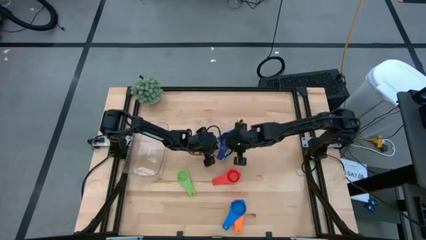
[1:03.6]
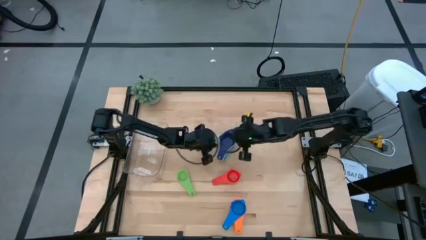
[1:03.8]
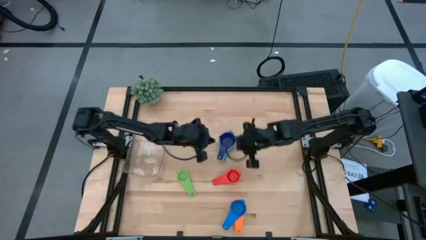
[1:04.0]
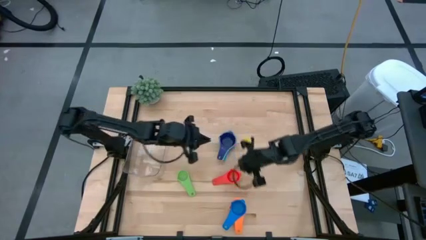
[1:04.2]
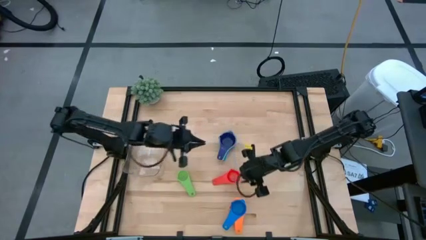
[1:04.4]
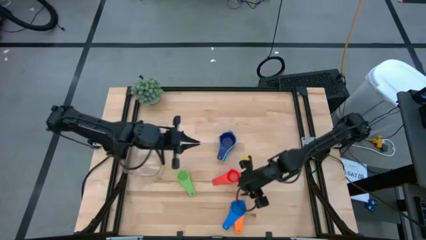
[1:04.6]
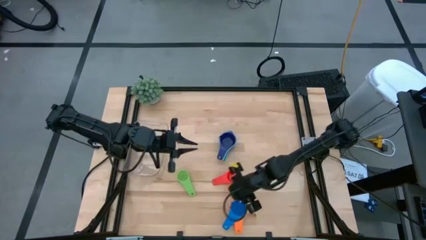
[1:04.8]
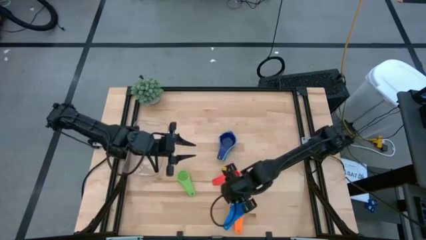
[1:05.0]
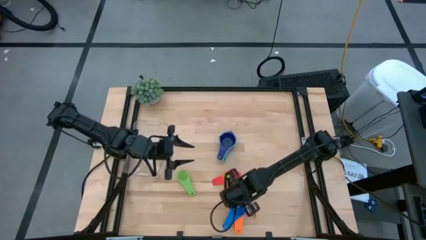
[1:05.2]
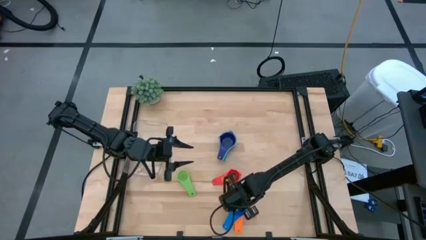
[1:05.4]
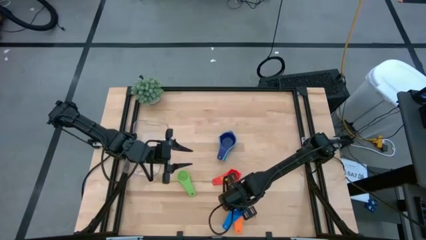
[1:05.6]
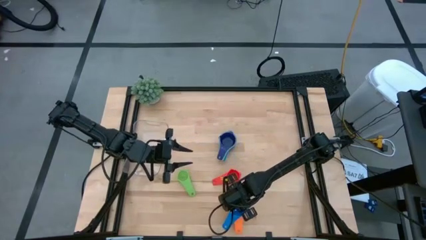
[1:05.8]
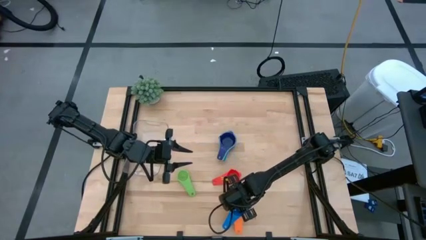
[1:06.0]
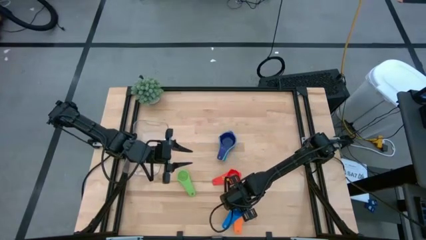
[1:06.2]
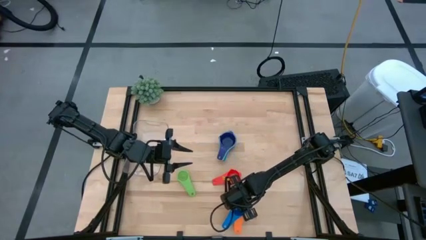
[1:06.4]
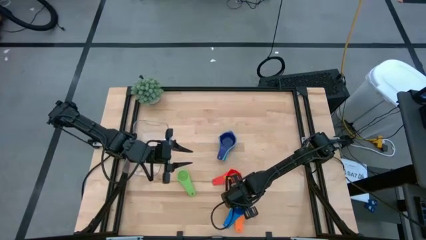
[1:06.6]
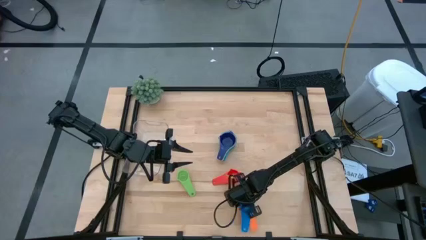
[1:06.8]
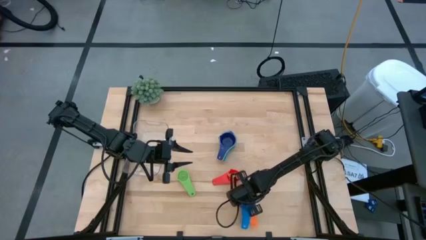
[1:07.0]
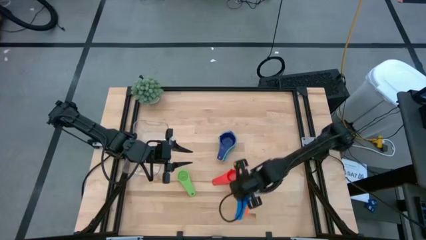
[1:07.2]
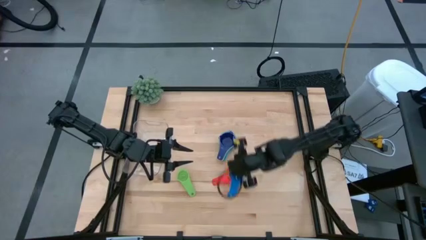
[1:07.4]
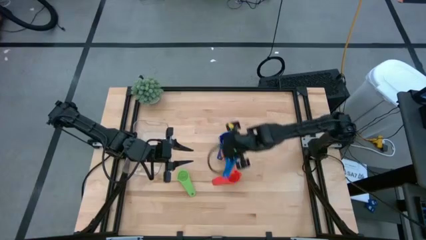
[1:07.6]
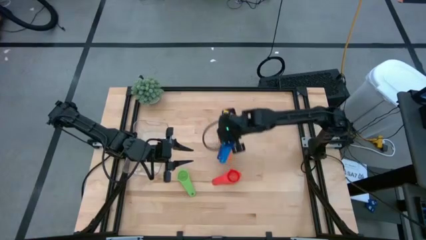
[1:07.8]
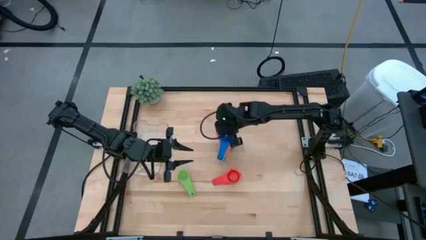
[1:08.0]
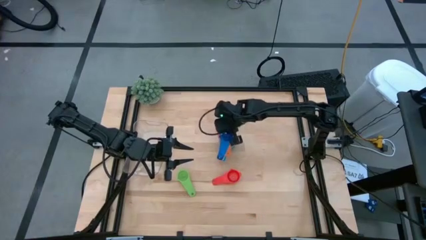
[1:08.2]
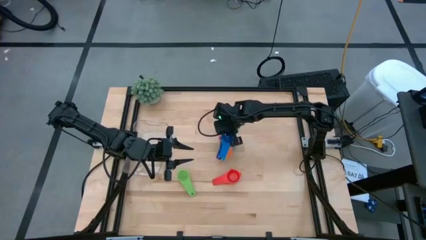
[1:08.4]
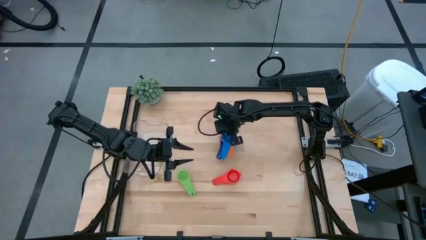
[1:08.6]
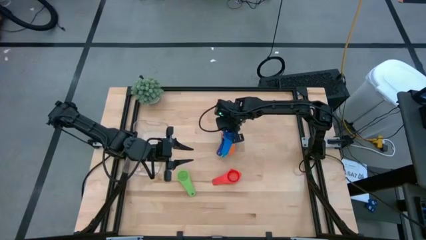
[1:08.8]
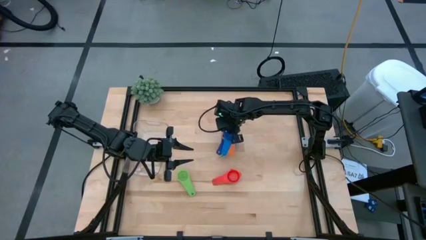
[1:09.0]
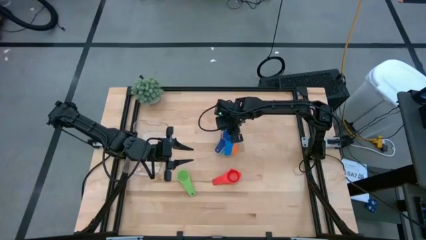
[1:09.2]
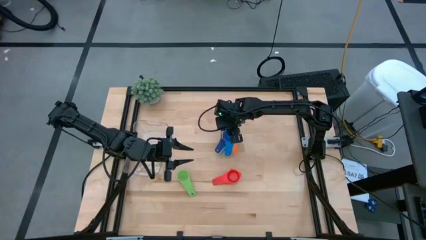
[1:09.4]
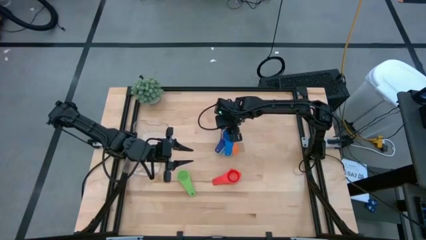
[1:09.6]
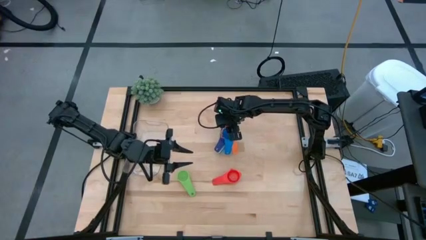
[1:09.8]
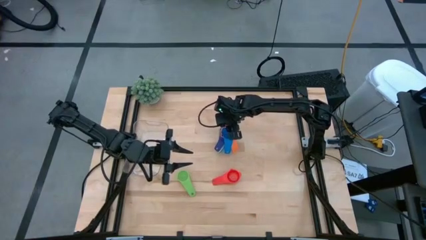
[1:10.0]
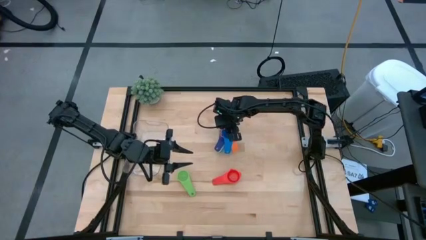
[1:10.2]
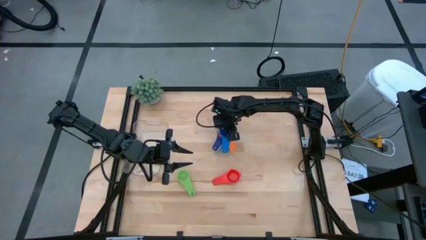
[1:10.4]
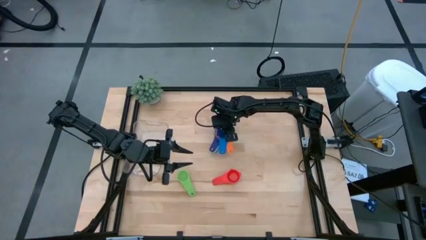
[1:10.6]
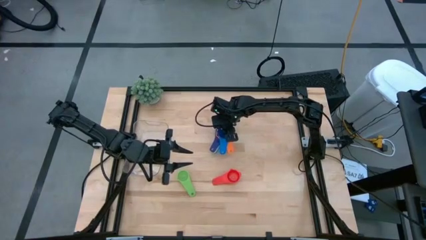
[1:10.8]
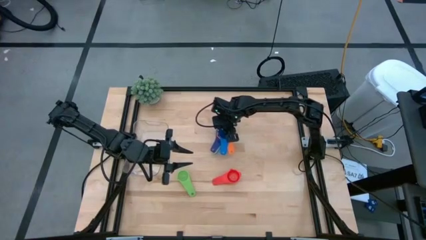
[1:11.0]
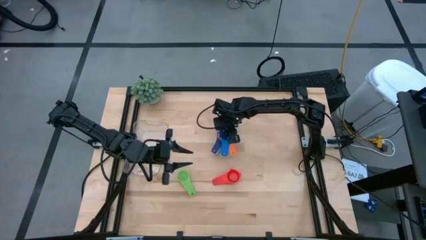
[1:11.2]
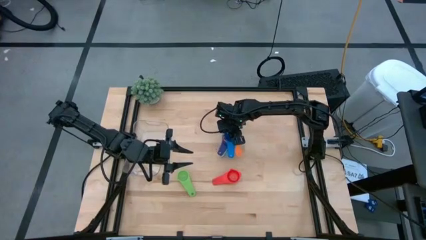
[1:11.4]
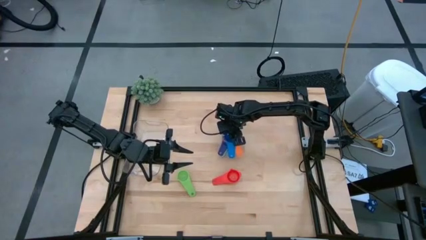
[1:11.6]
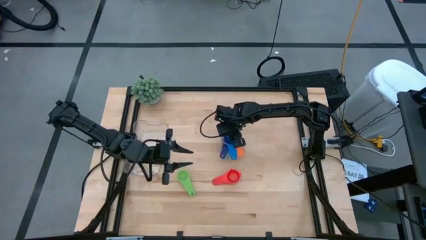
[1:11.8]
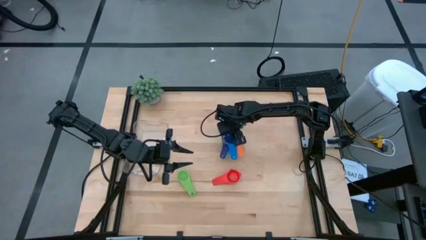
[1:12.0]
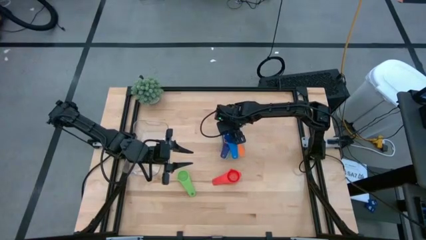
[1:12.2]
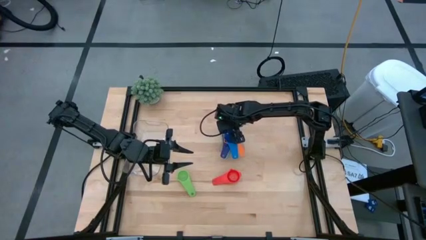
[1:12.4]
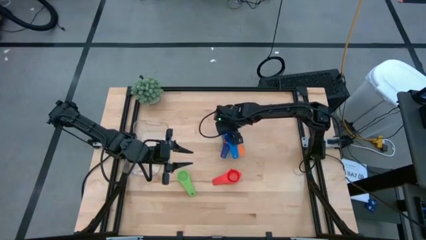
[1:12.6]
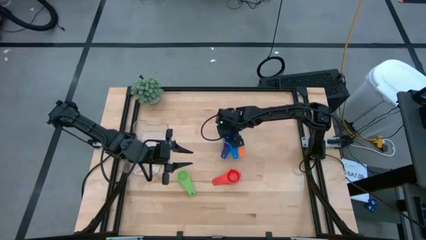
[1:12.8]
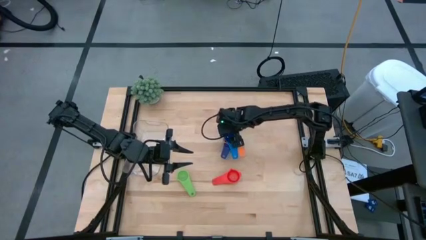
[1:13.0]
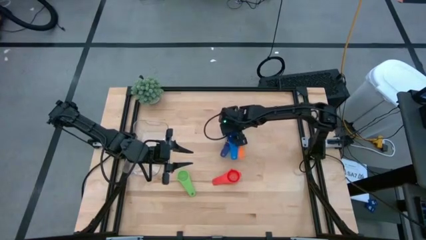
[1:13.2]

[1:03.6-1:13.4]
Task: Nest measuring cups in basket
Stack the bottom stacked measuring cup on top of the top stacked measuring cup

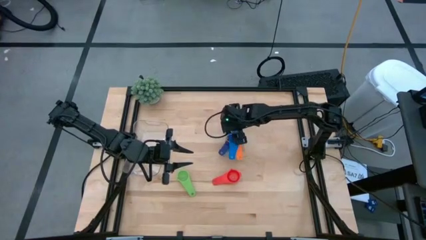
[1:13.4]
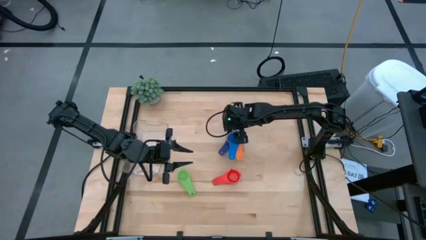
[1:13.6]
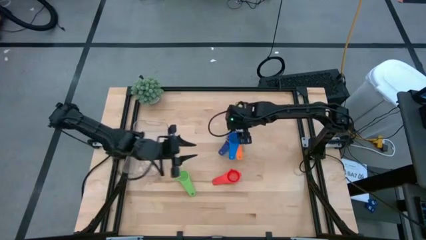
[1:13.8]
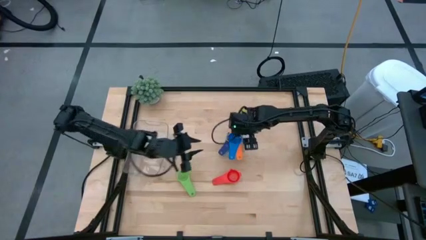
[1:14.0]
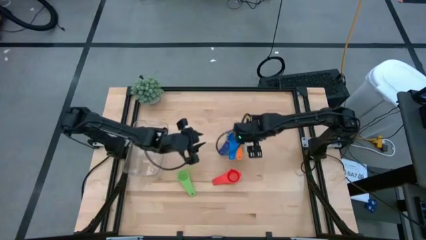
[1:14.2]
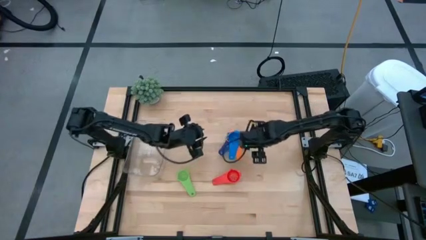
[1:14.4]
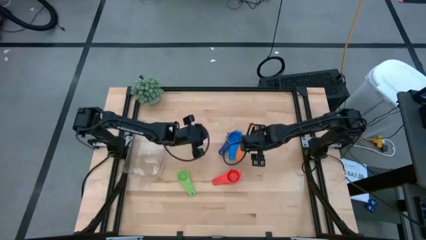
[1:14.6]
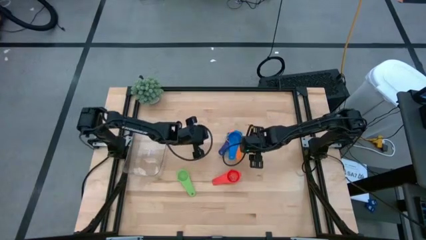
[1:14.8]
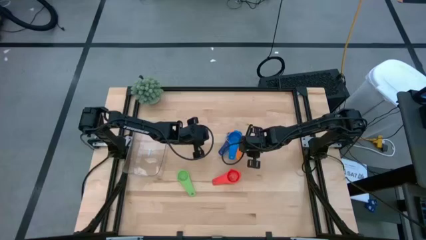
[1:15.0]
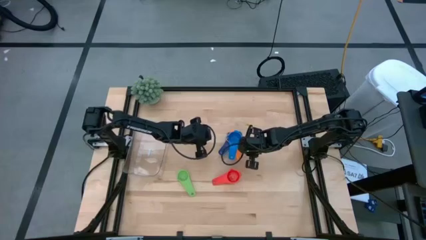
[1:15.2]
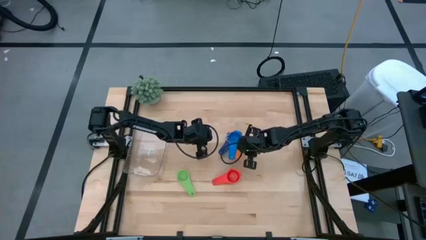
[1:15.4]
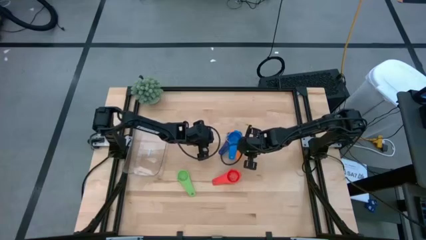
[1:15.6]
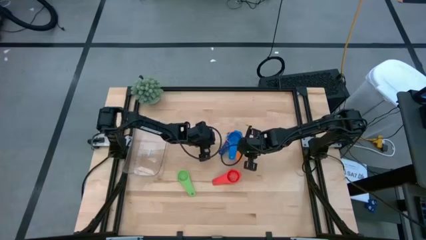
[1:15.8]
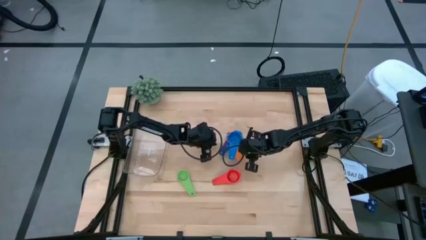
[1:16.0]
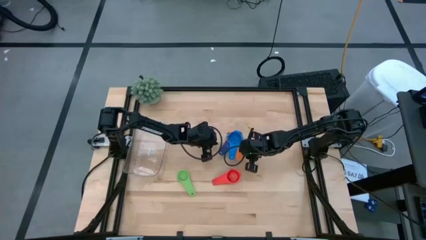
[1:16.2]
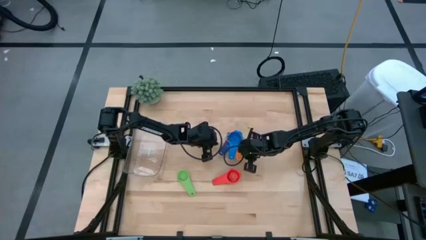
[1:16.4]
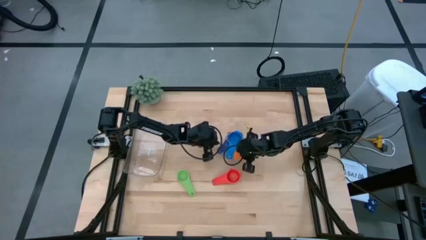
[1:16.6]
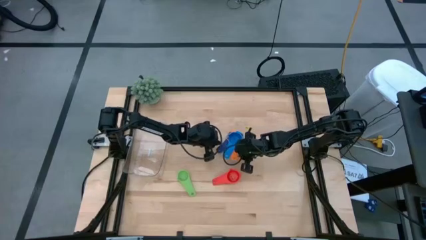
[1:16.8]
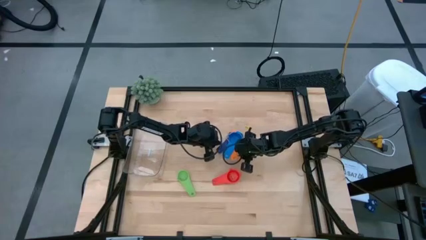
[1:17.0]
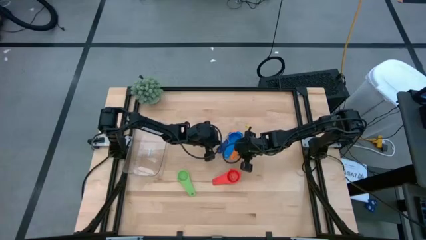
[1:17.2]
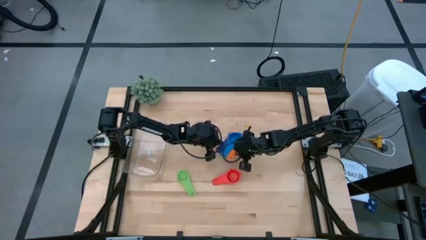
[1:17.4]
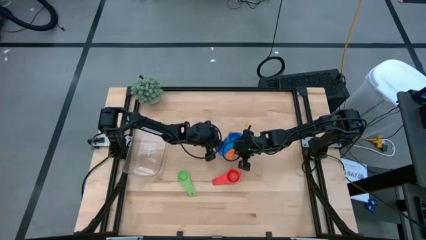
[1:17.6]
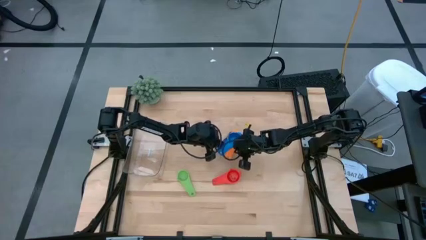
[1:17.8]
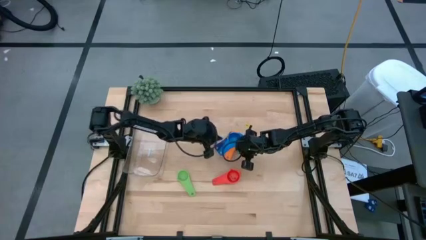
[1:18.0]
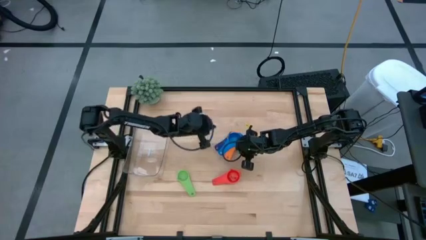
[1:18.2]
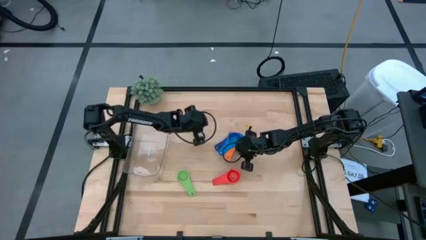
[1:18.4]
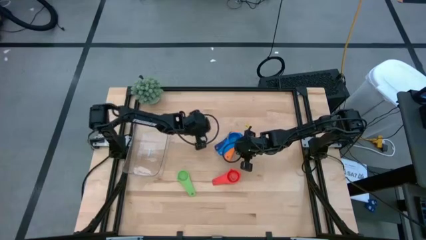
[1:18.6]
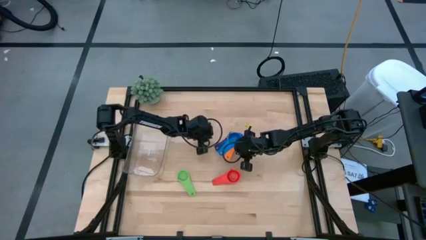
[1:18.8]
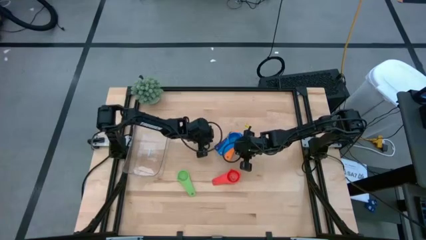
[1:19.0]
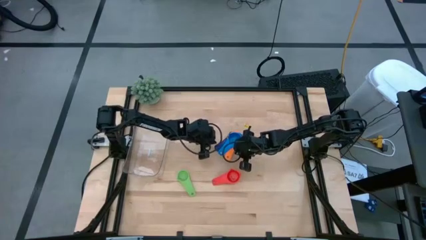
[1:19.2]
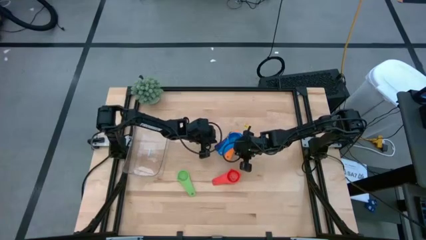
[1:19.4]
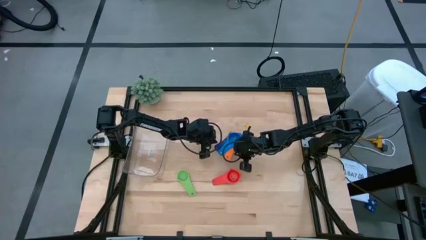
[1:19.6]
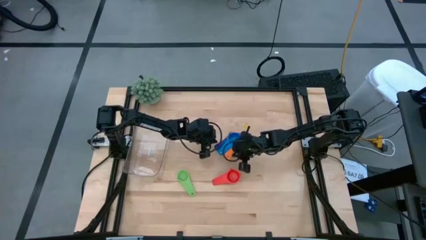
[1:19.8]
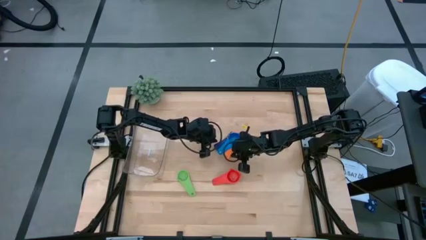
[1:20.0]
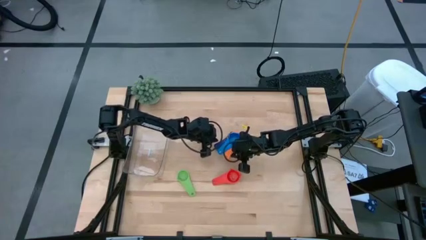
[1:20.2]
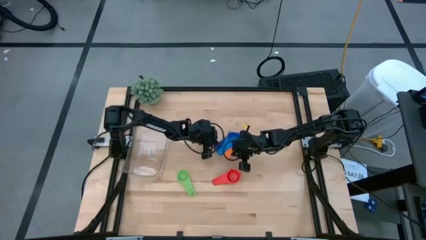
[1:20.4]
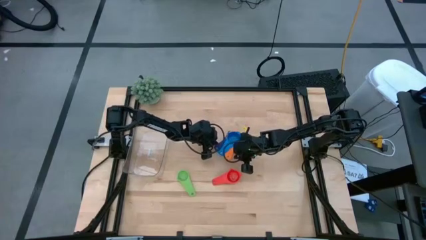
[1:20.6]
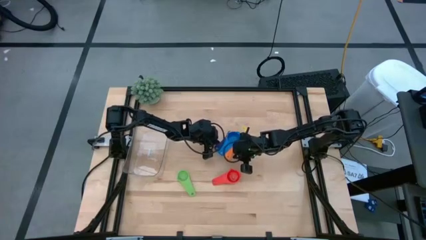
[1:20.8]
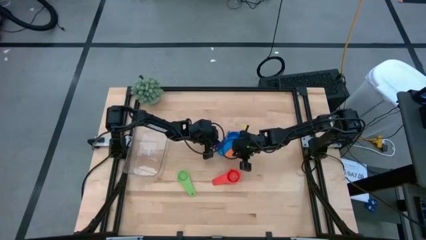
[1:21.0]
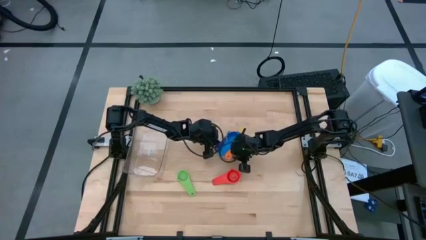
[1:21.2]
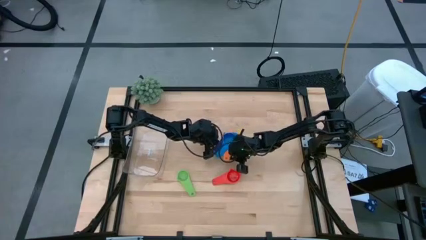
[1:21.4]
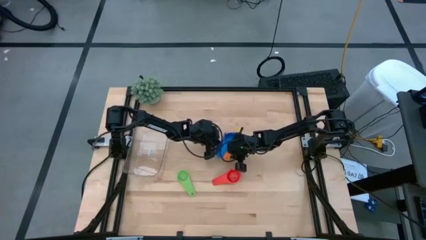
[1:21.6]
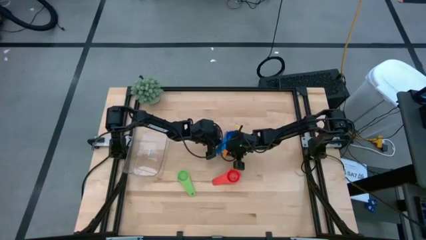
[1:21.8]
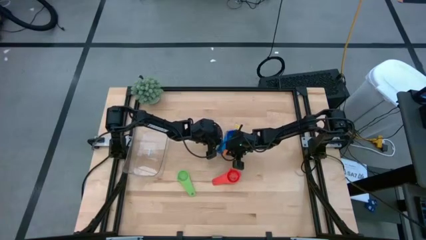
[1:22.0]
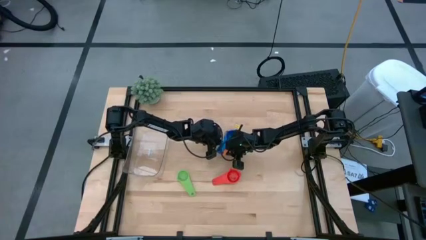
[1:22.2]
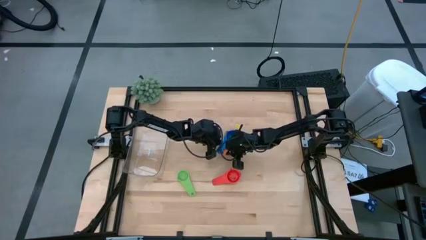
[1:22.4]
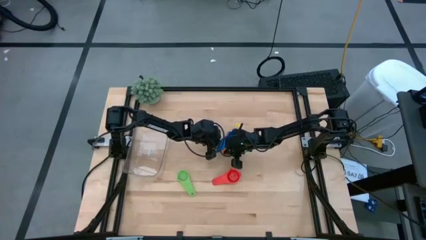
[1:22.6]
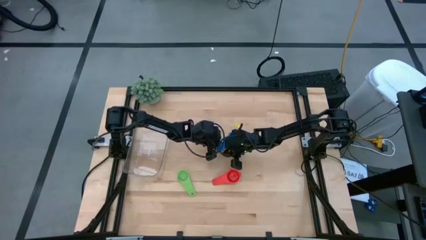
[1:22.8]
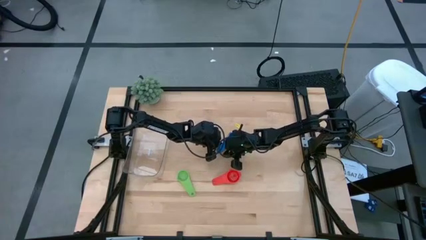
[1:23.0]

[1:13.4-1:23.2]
Stack the bottom stacked measuring cup on top of the top stacked measuring cup
